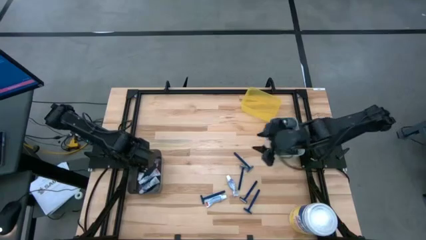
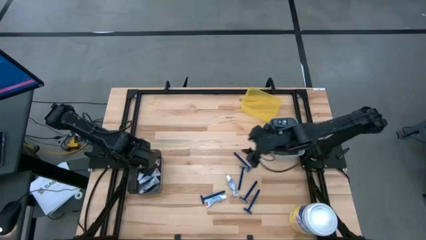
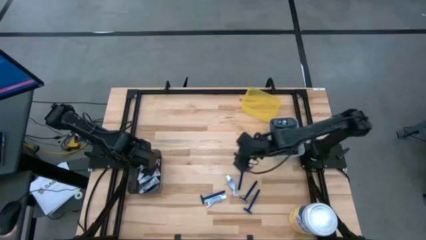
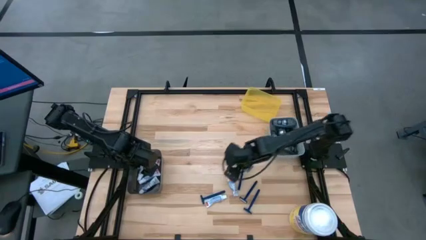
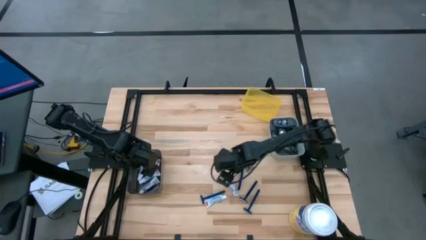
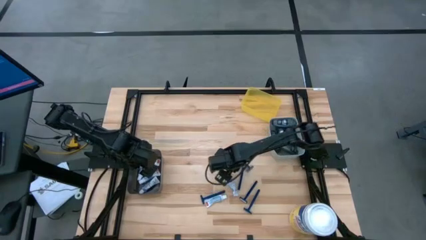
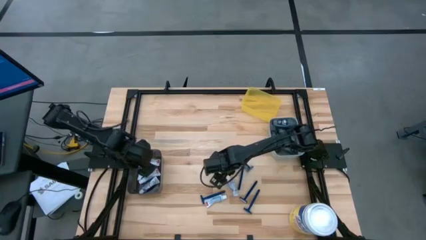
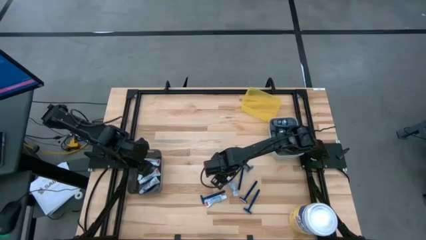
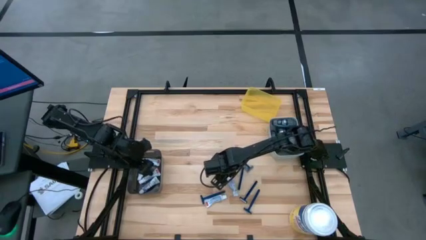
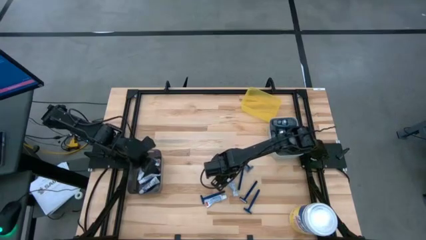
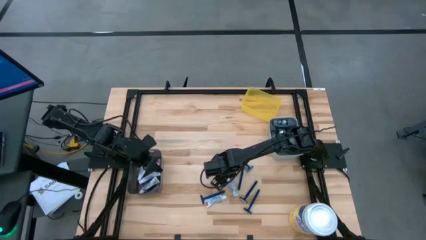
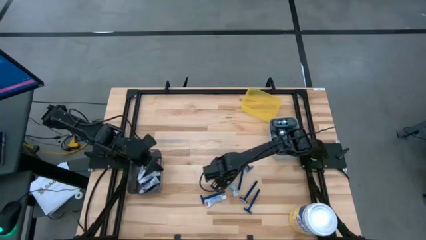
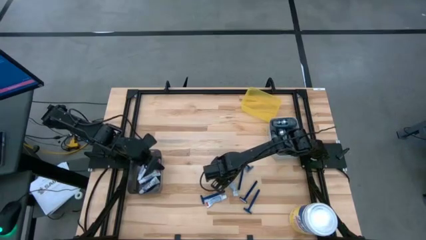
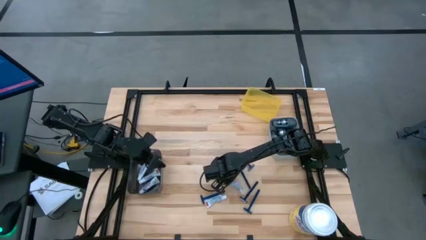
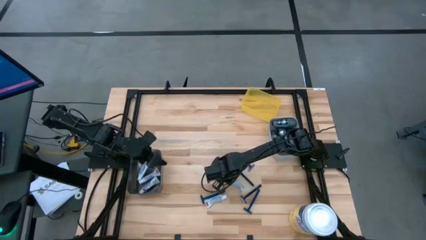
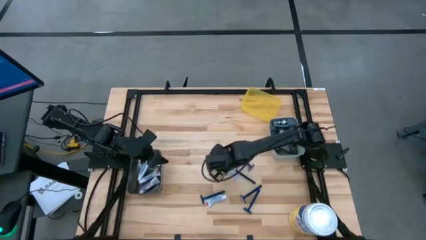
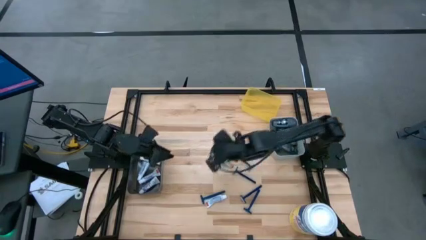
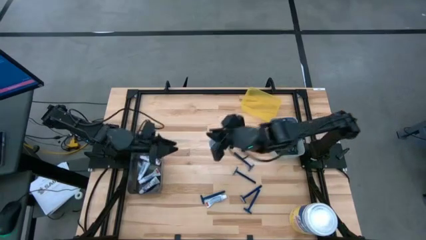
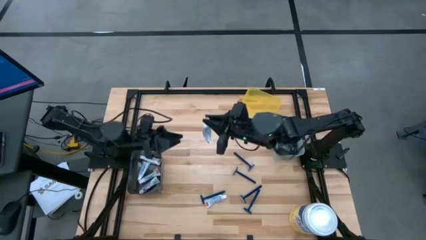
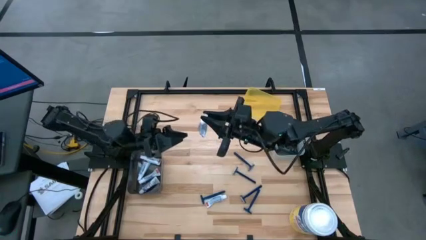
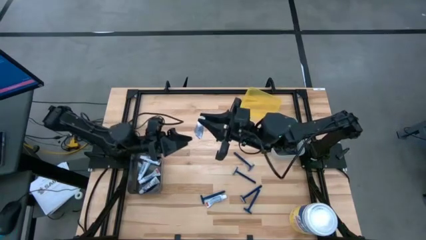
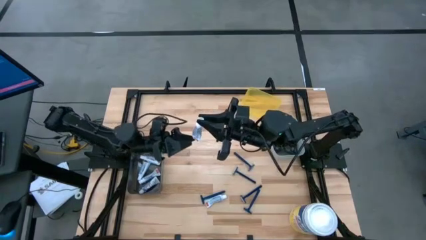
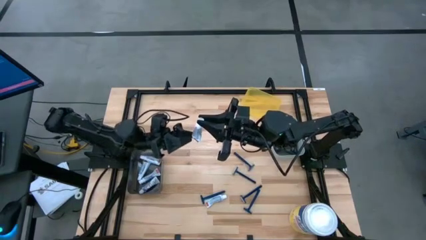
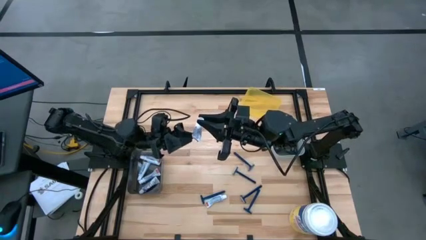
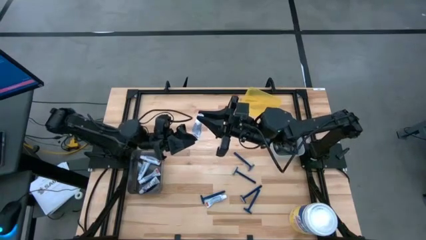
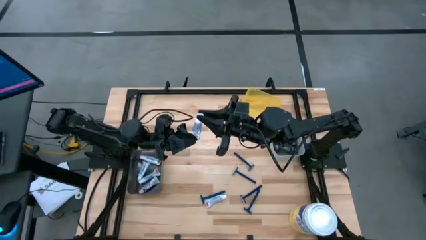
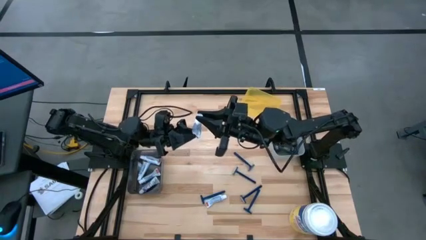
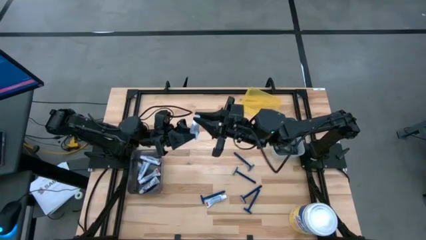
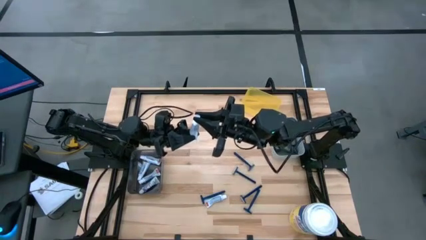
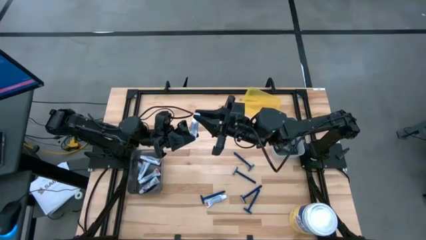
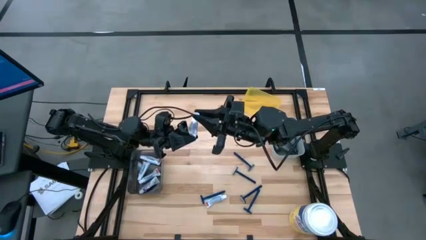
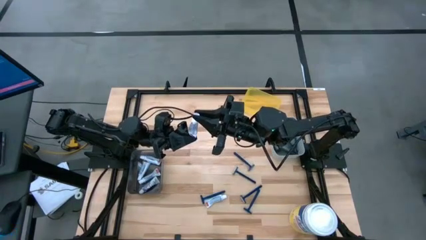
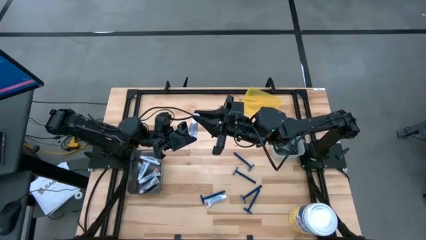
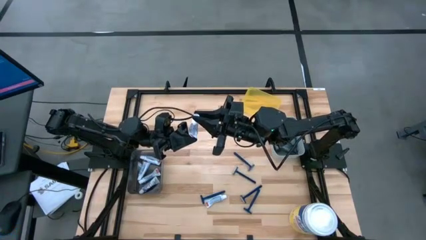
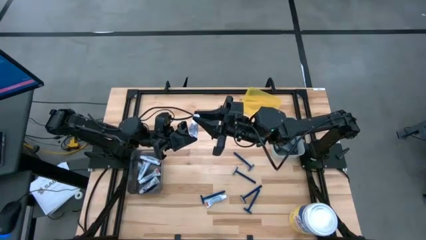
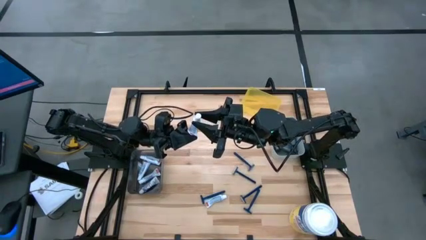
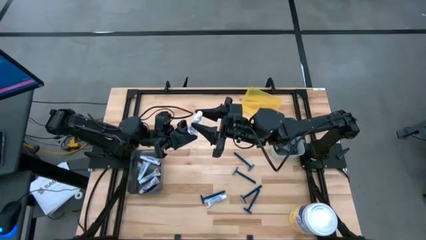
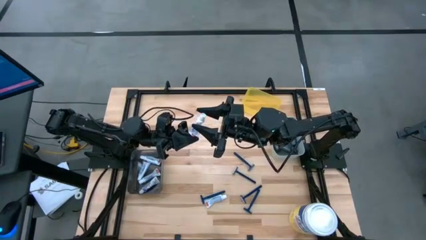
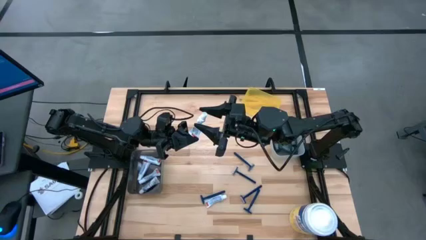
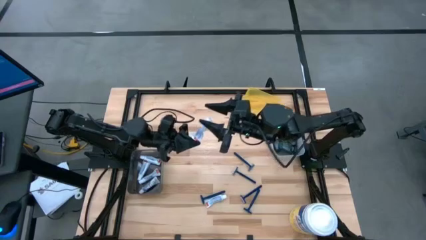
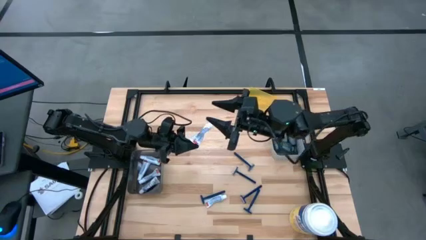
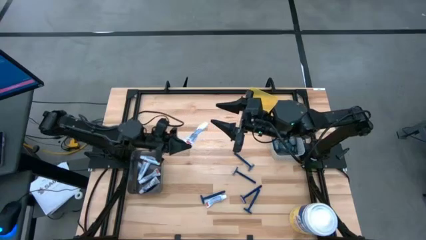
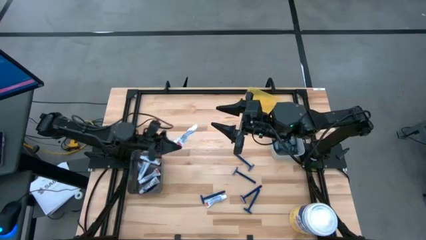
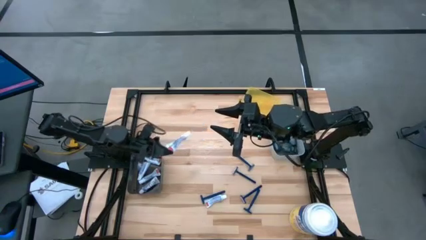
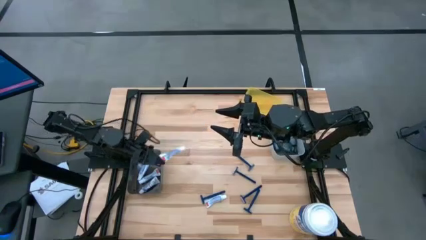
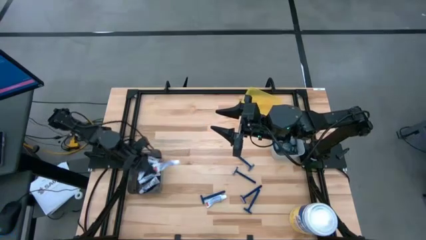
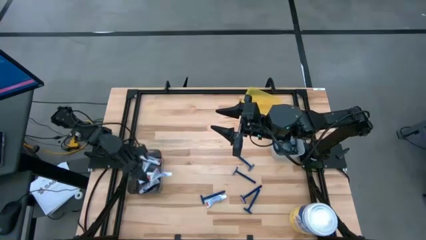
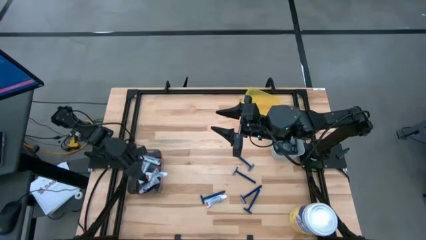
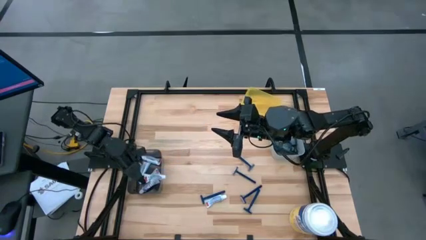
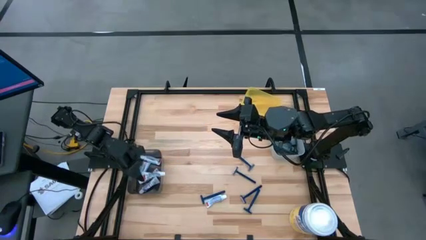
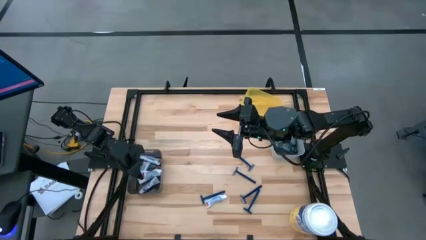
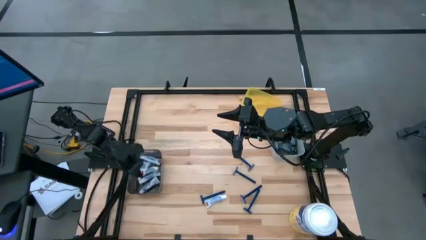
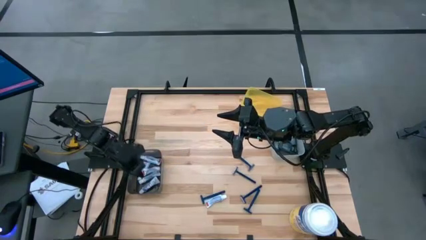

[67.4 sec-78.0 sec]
Task: Pick & Place Travel size toiletries
Put the white toothpaste into the black bin

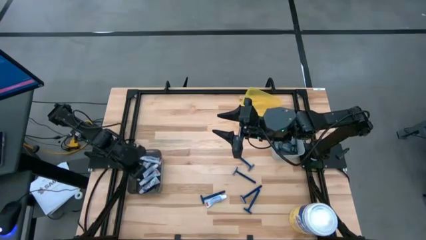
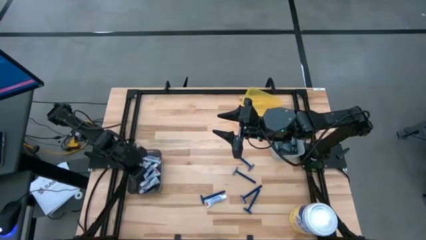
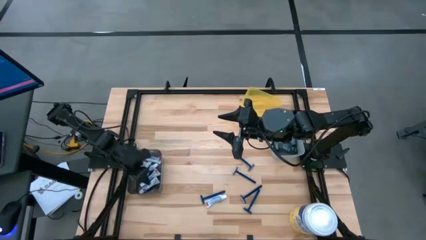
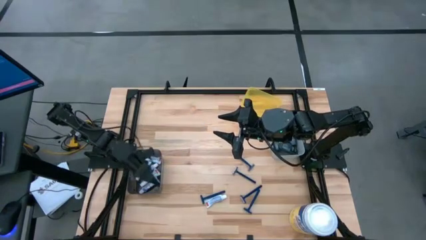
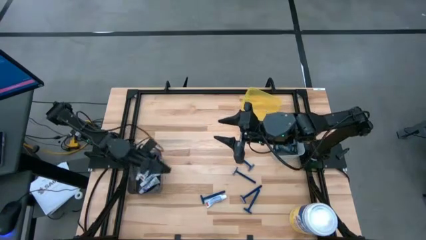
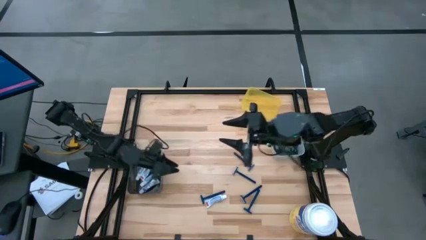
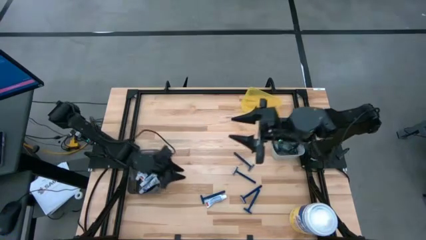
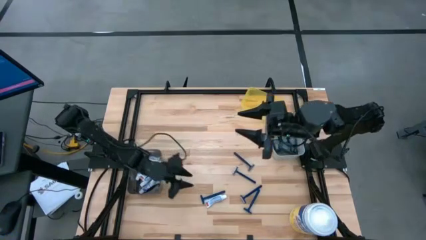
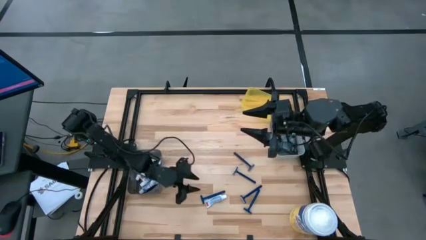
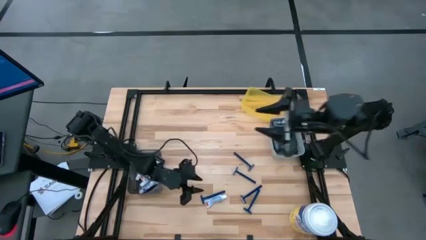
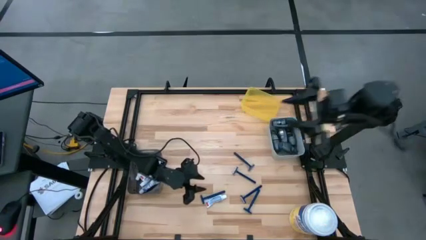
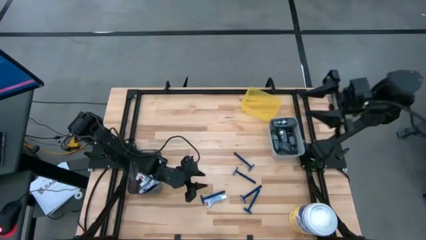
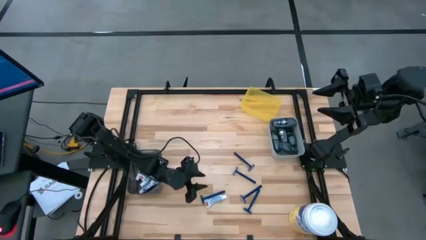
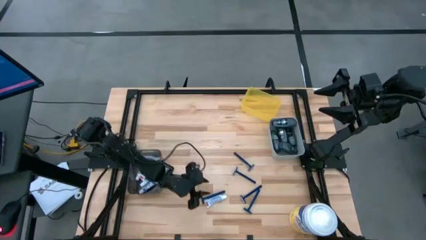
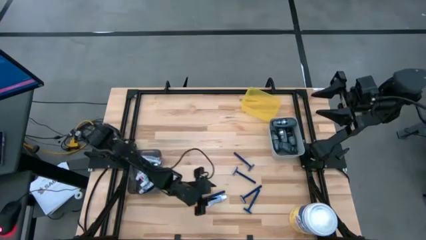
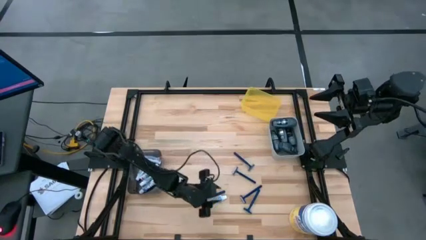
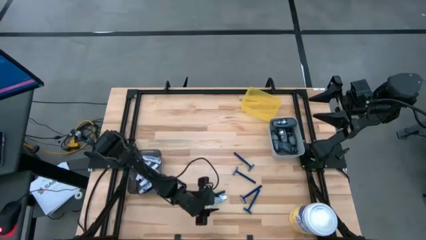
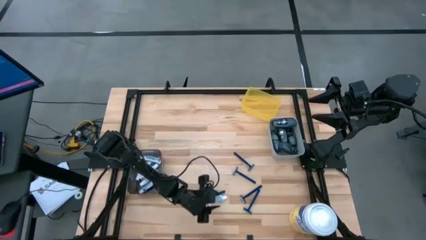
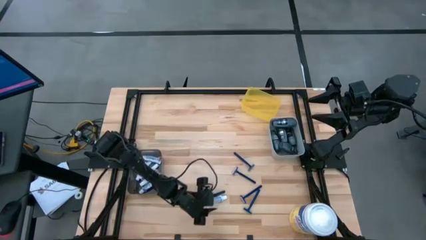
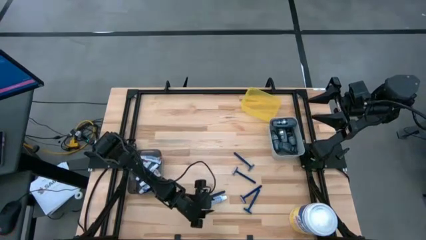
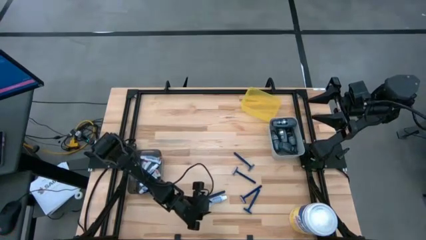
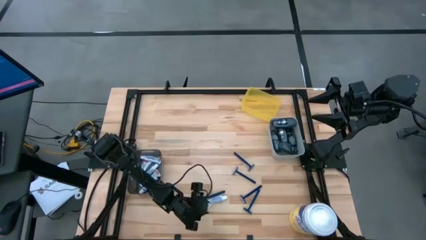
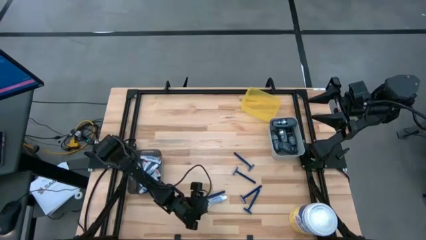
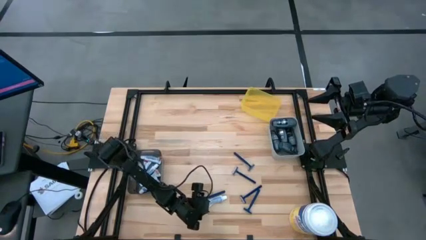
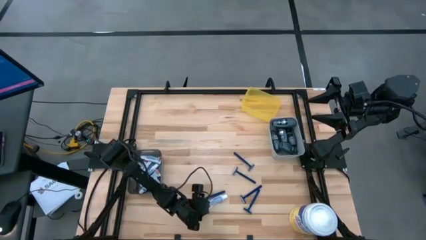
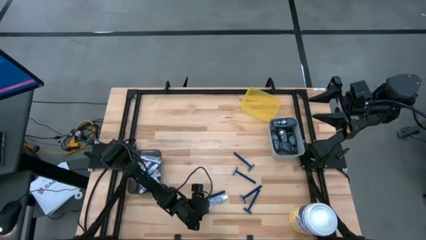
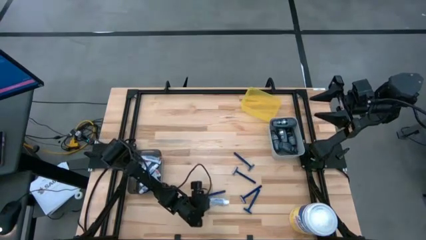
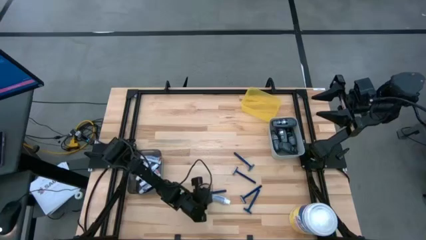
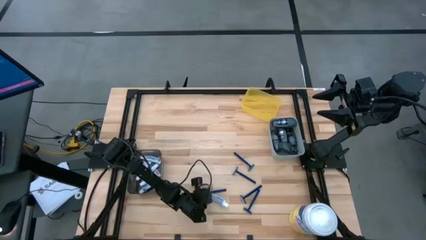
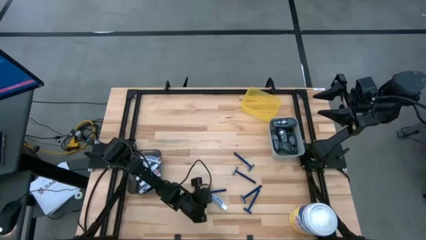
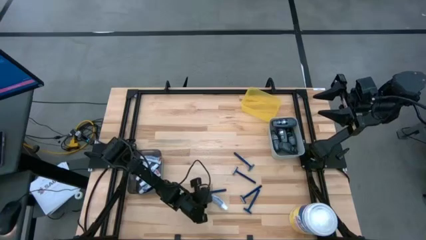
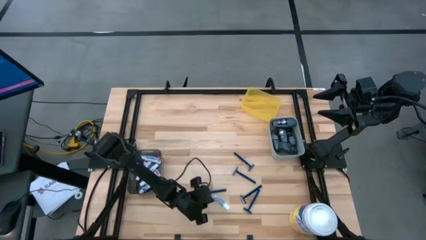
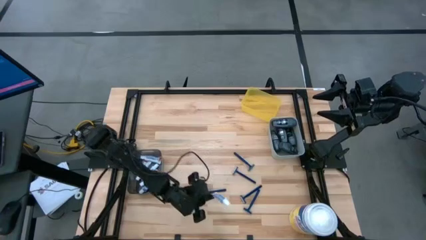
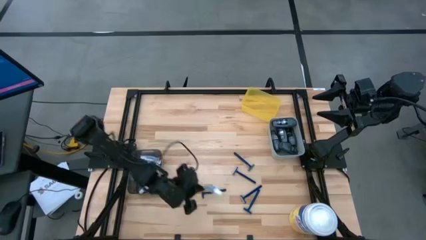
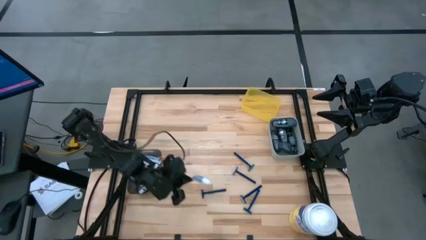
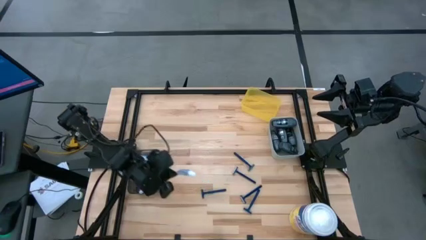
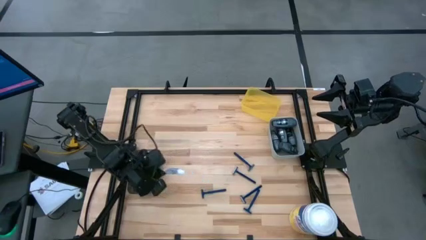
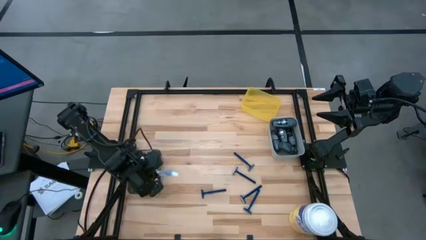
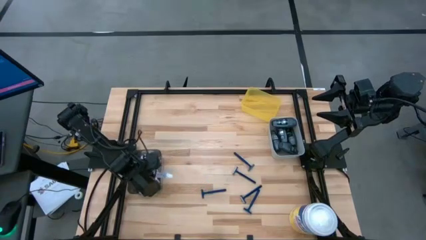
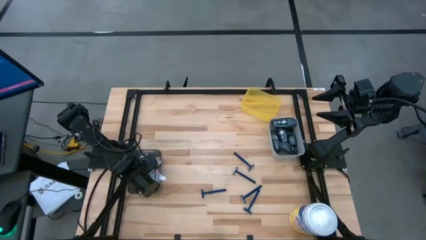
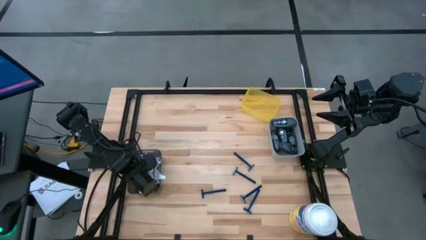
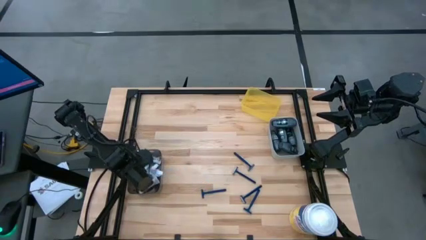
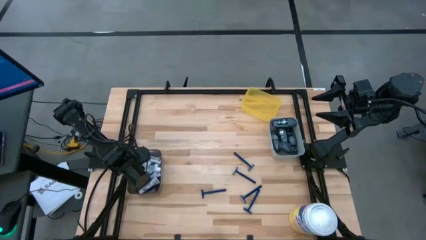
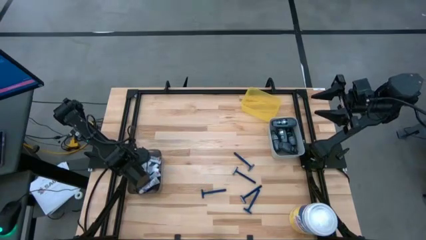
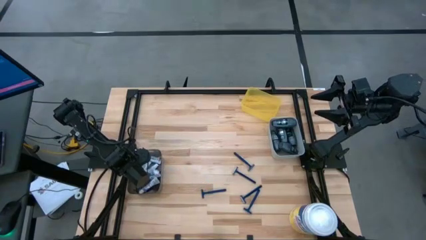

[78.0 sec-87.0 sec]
Put the white toothpaste into the black bin
